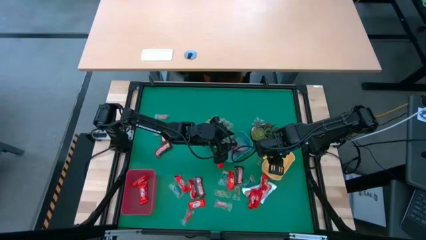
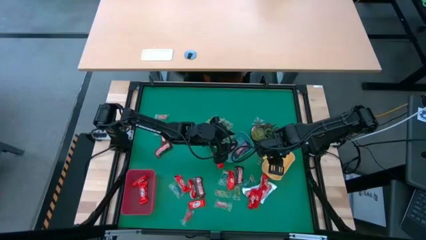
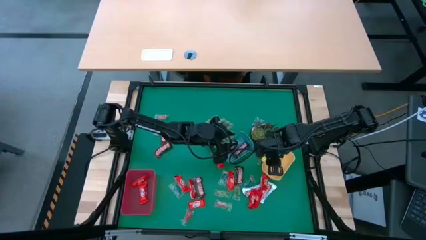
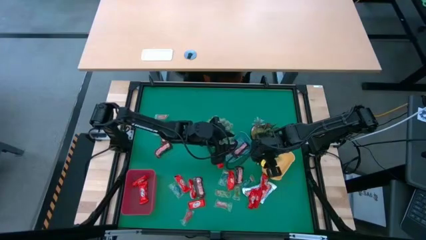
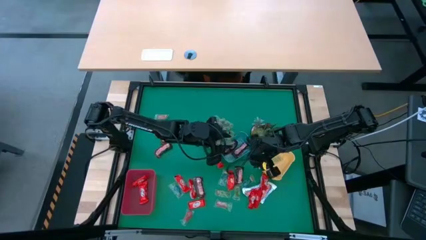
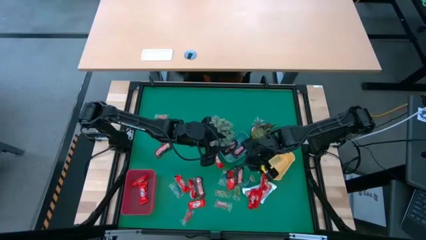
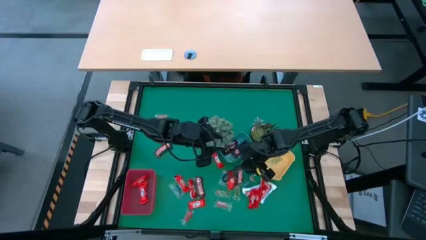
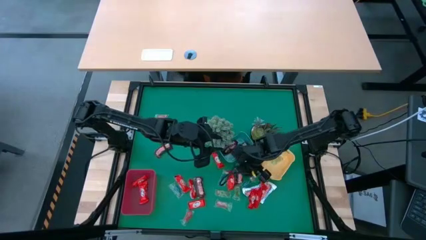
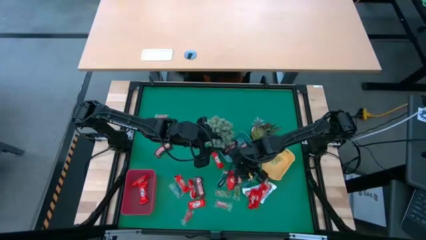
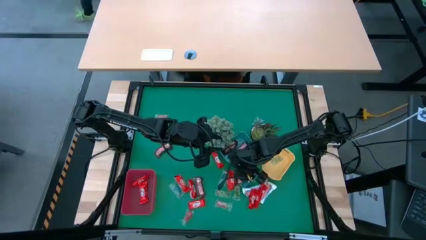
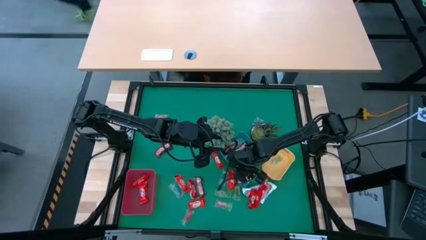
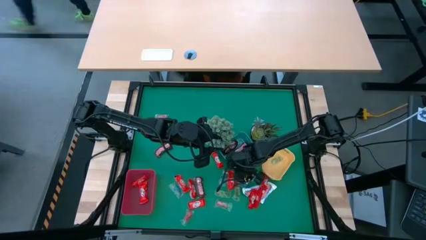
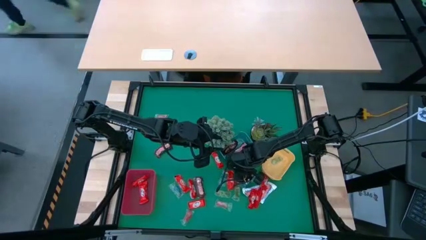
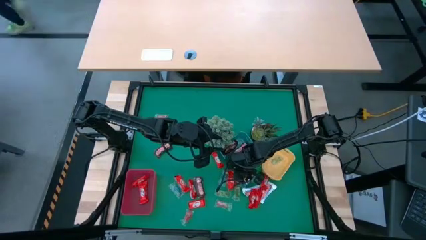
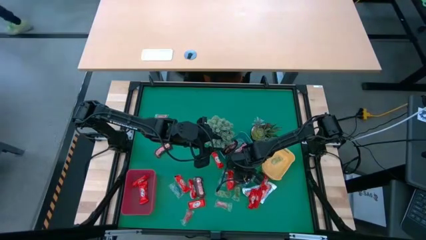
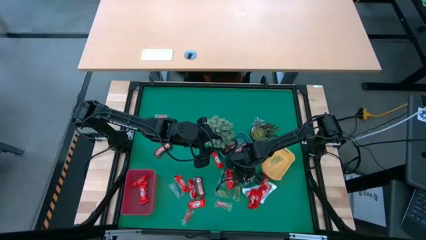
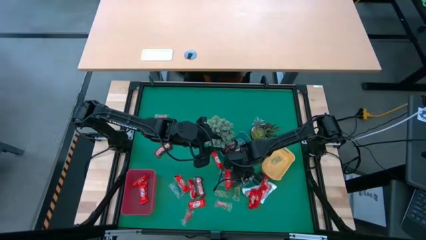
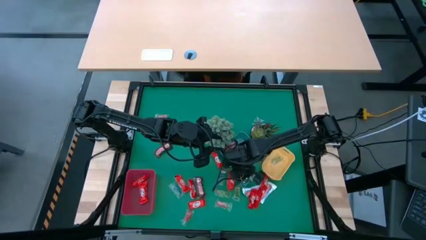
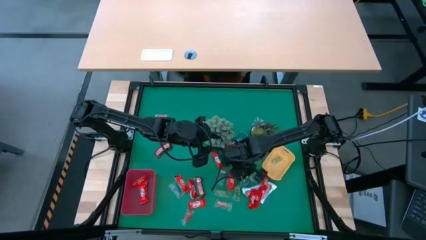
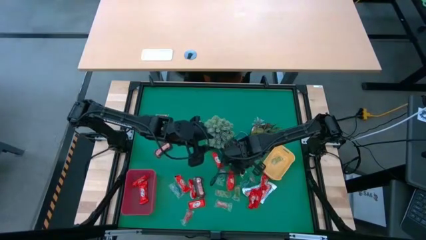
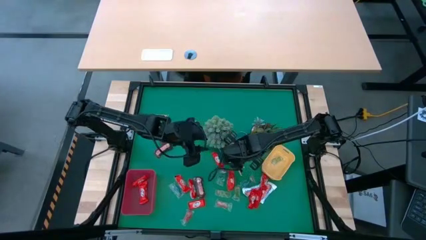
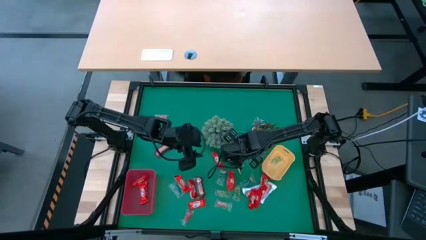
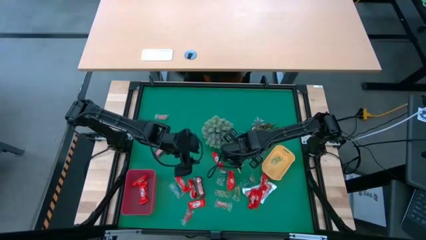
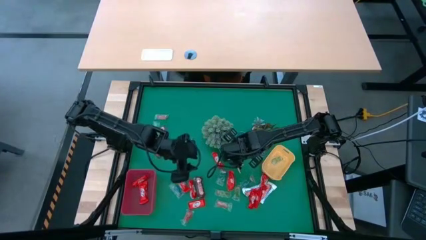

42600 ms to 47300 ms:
Task: Organize candy in baskets
Put the brown chocolate into the blue bin

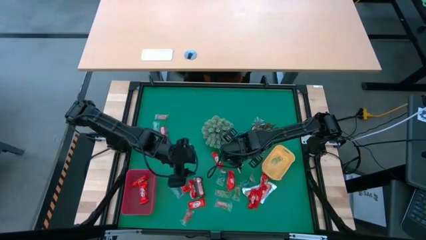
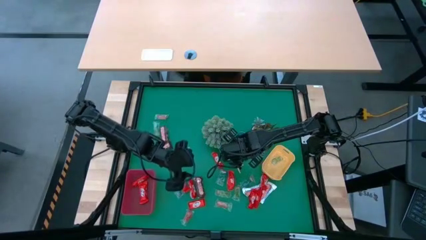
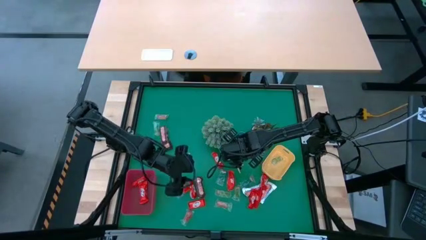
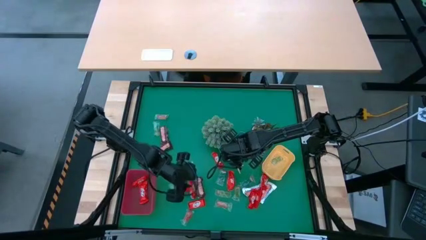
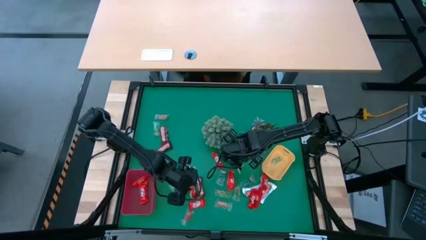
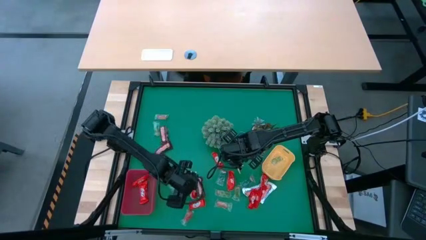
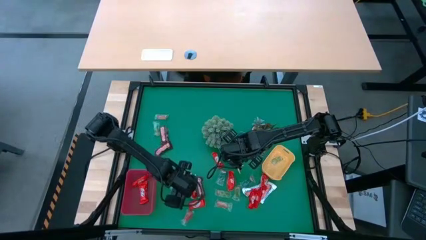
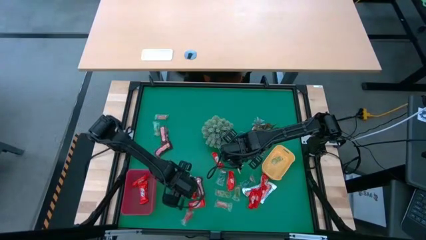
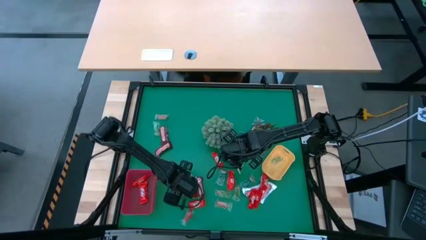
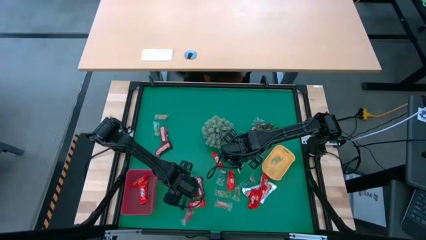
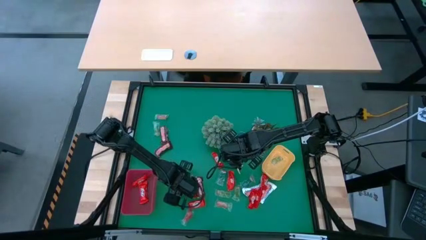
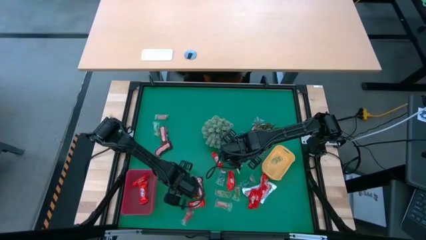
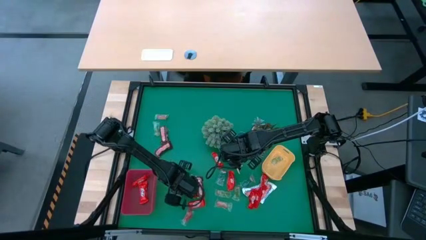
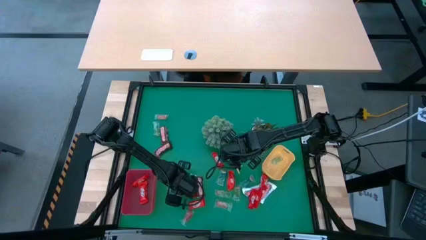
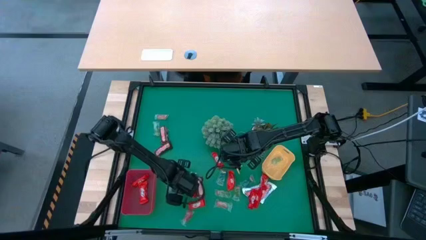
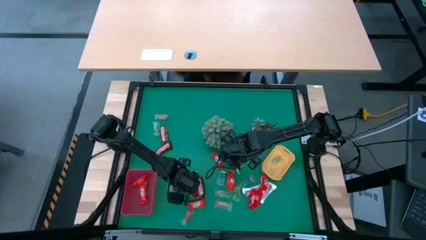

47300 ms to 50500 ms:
Put the red chocolate into the red bin

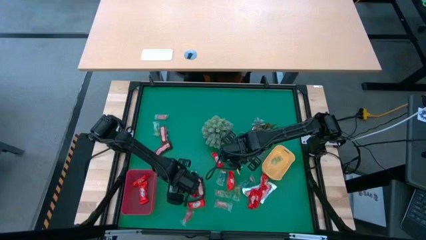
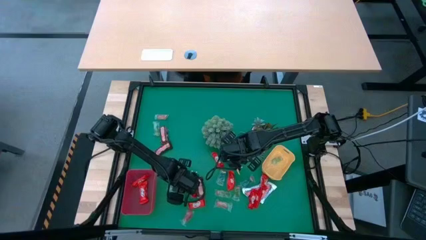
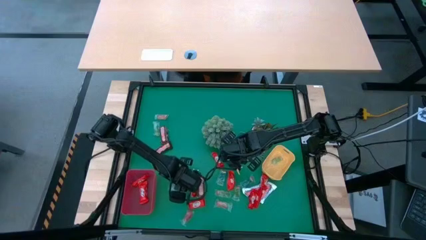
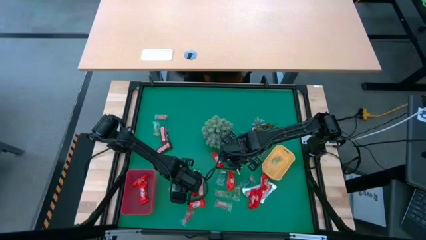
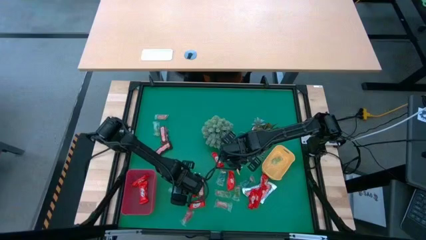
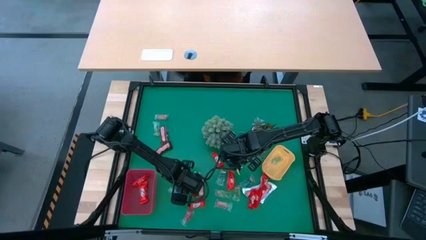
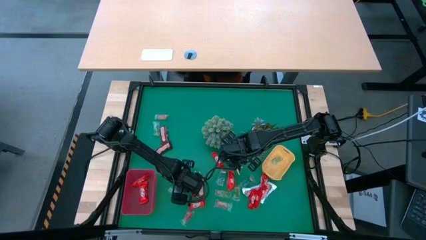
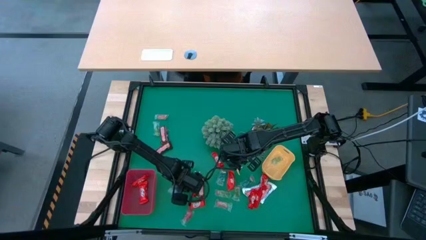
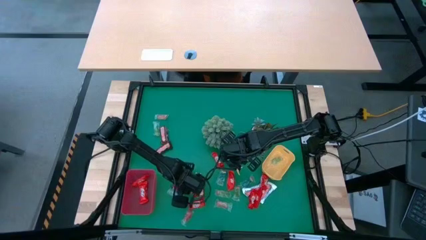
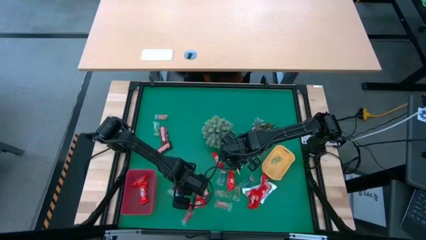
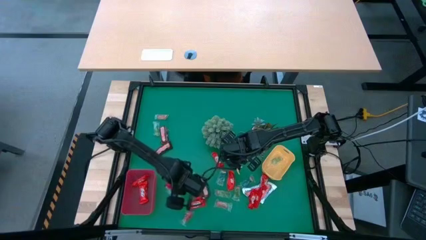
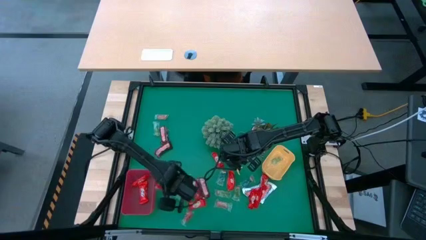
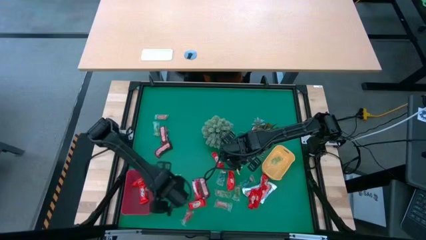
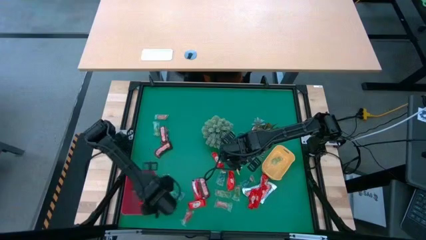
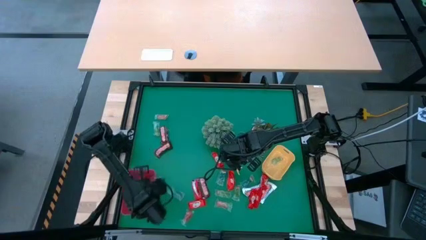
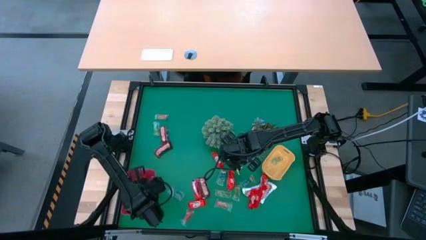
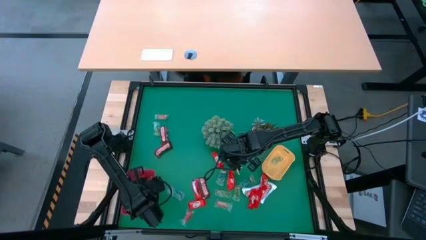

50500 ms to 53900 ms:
Put the red chocolate into the red bin

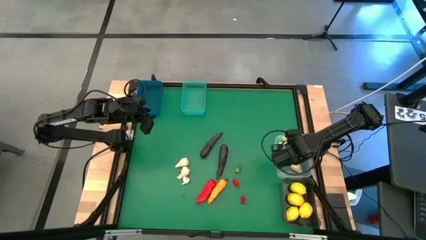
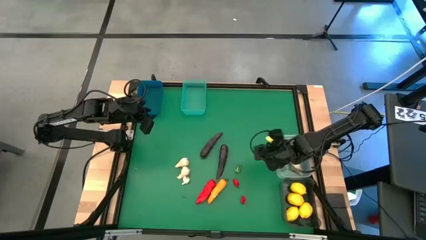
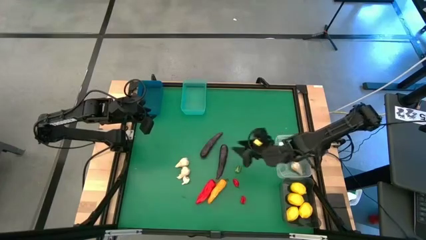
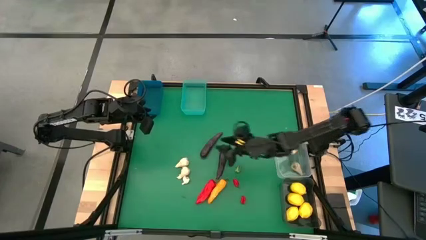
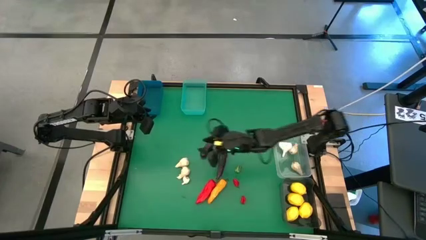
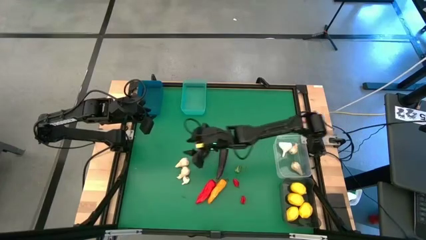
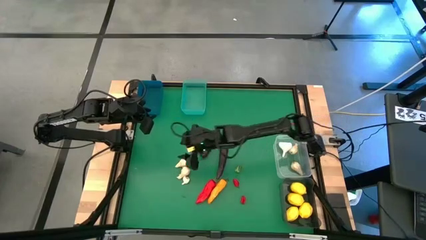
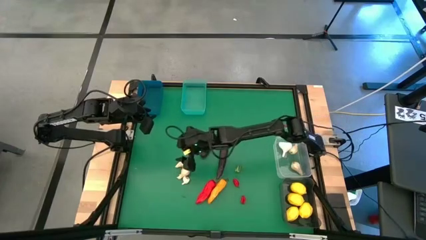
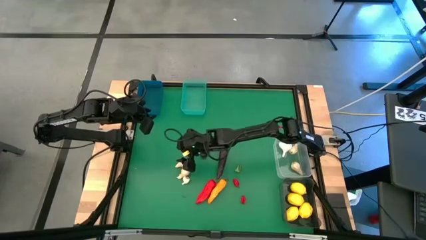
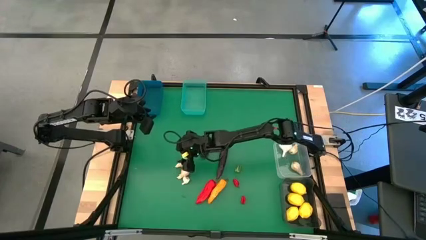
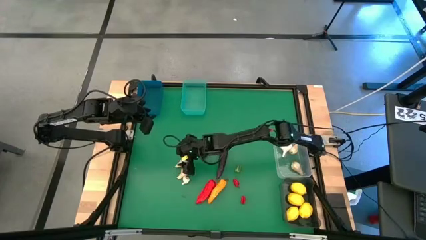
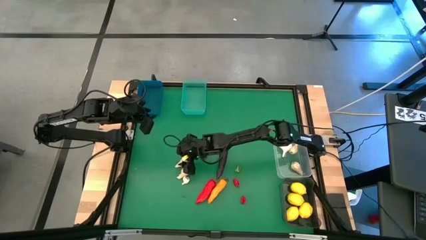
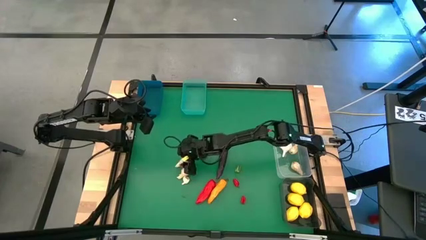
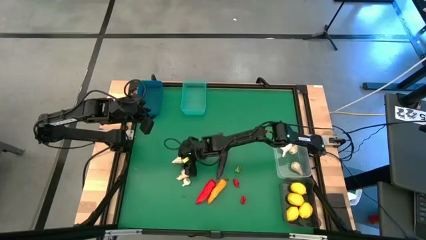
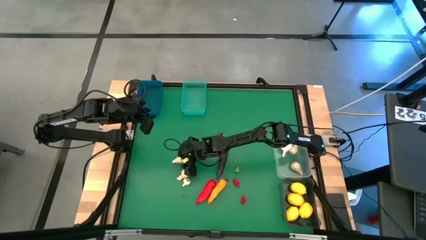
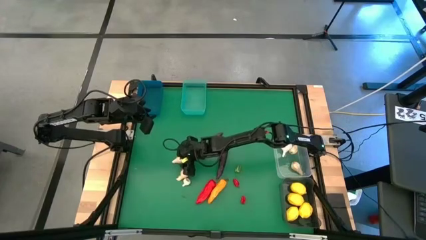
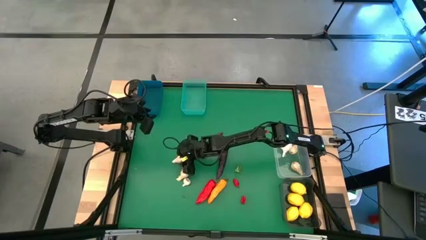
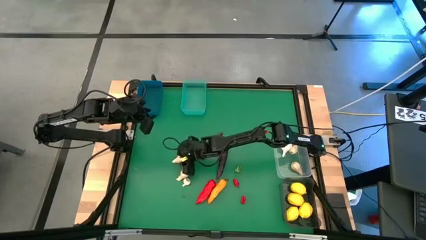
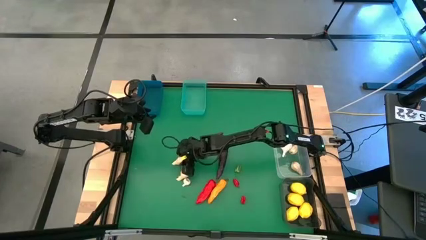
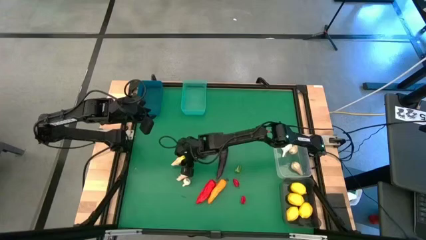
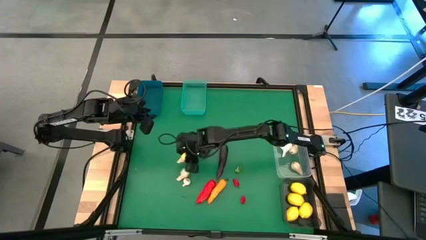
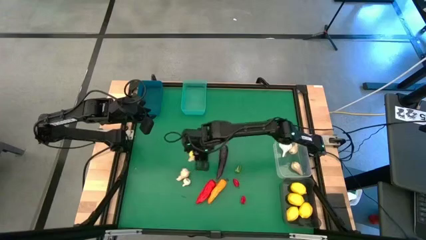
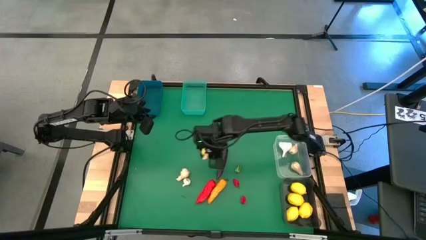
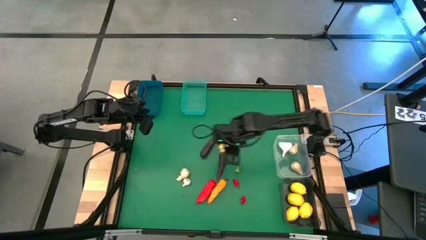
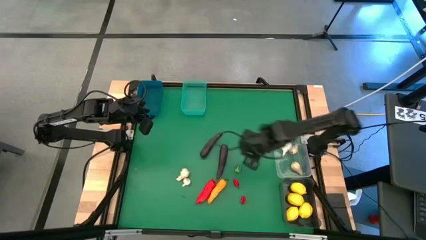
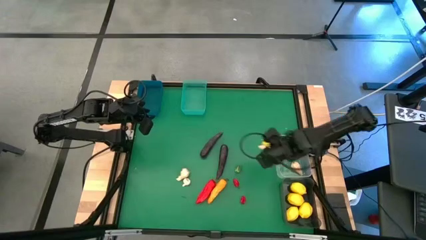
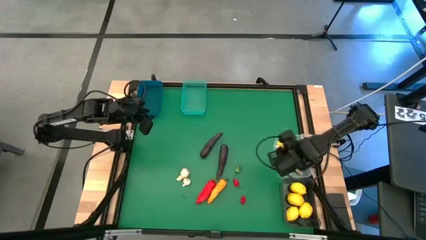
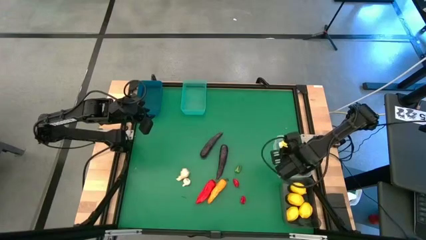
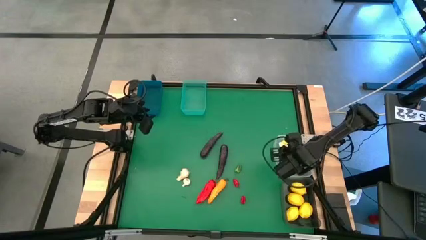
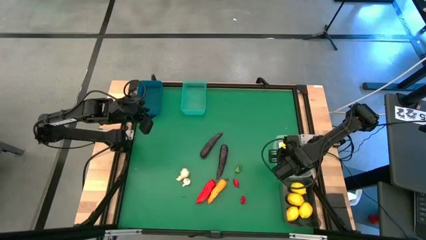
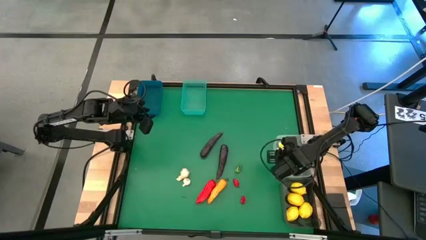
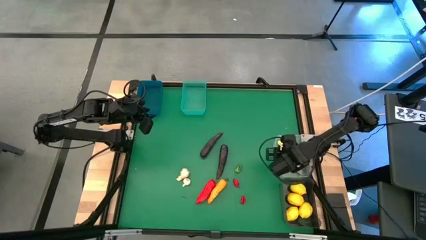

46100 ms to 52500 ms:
Task: Sort produce into baskets
Put the white garlic into the transparent bin
